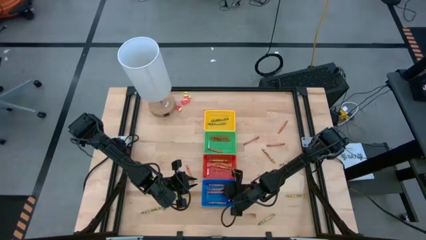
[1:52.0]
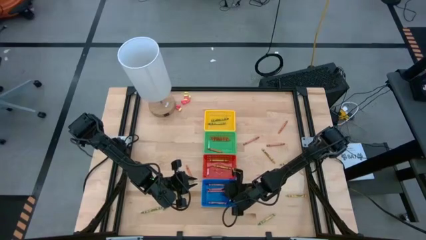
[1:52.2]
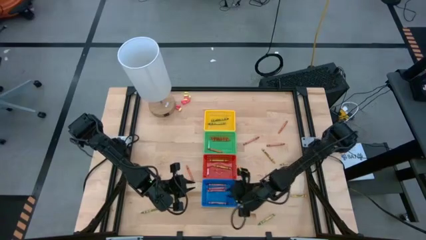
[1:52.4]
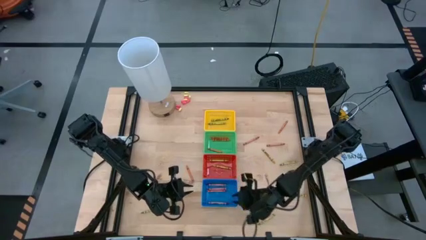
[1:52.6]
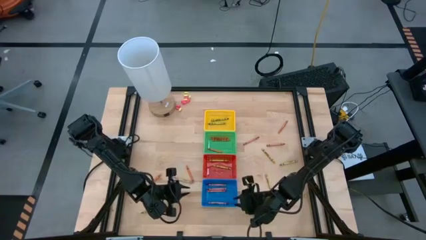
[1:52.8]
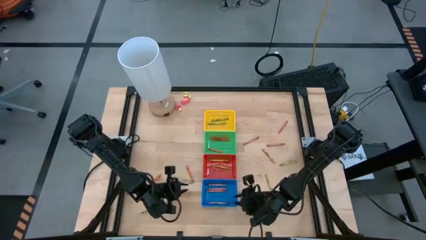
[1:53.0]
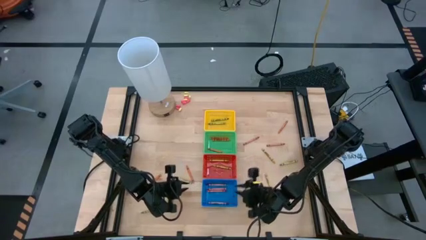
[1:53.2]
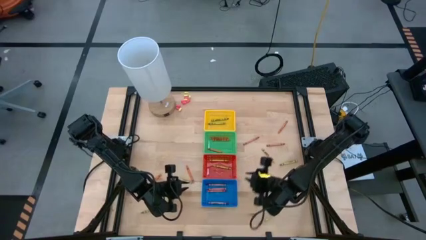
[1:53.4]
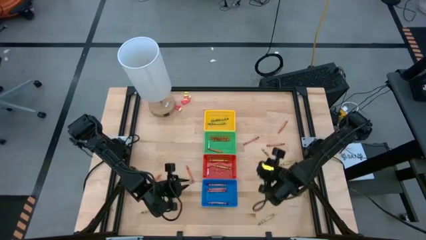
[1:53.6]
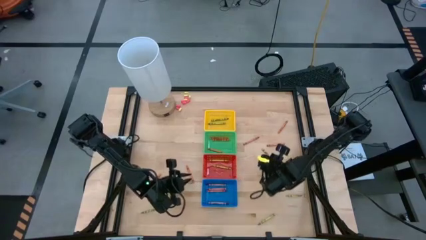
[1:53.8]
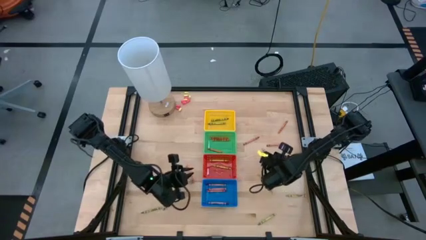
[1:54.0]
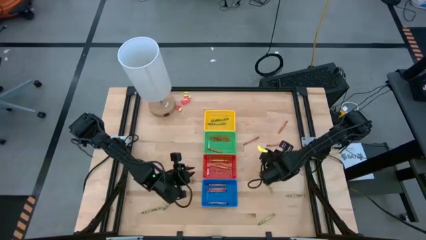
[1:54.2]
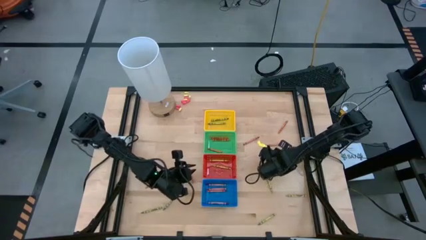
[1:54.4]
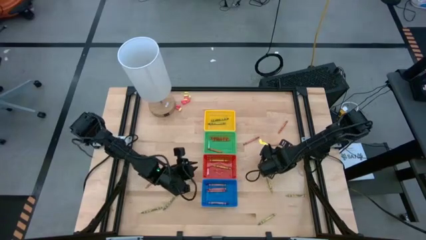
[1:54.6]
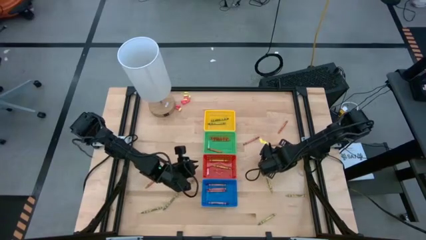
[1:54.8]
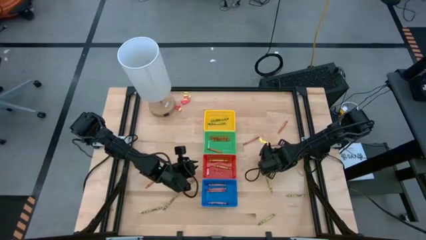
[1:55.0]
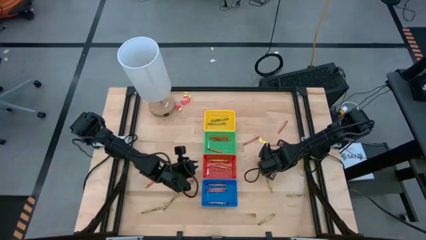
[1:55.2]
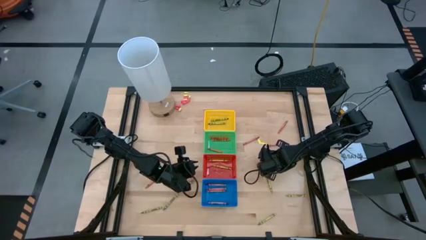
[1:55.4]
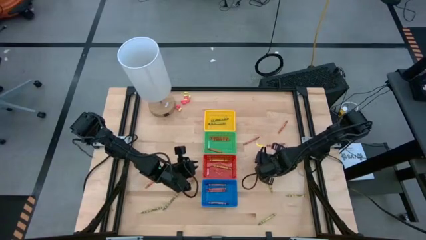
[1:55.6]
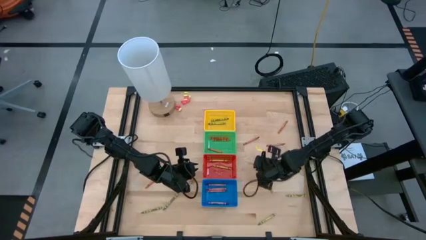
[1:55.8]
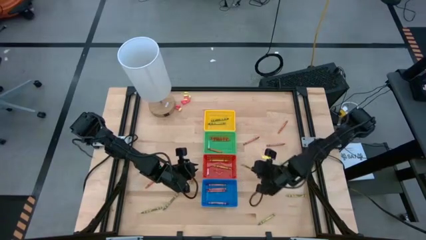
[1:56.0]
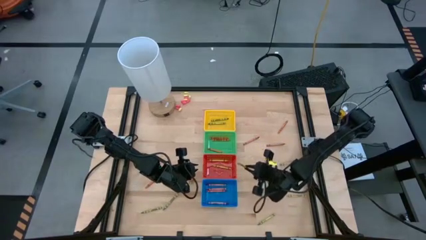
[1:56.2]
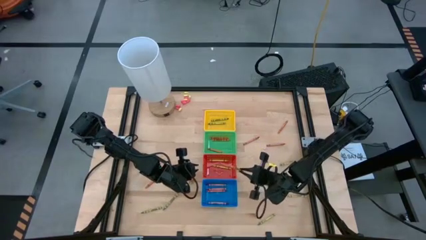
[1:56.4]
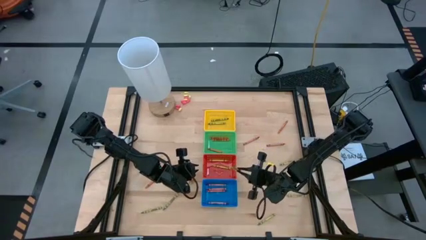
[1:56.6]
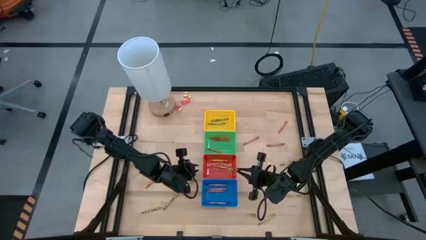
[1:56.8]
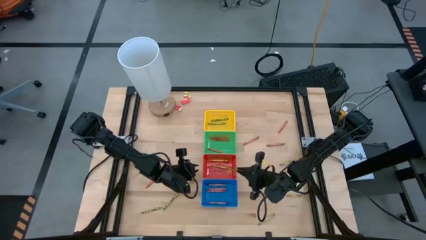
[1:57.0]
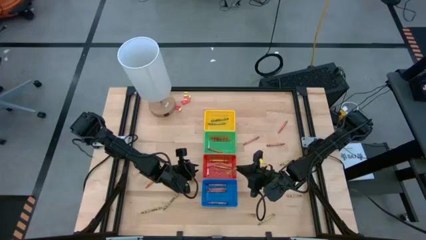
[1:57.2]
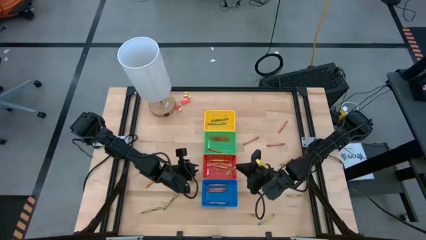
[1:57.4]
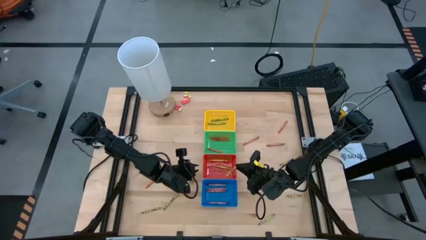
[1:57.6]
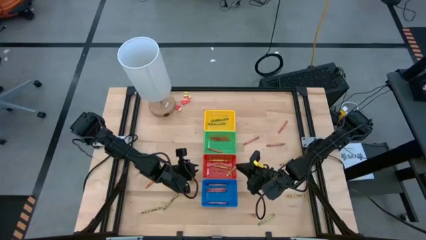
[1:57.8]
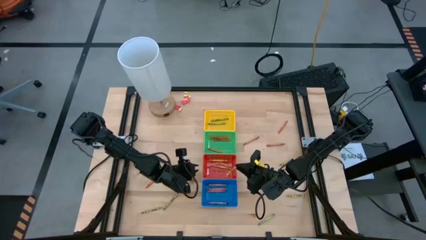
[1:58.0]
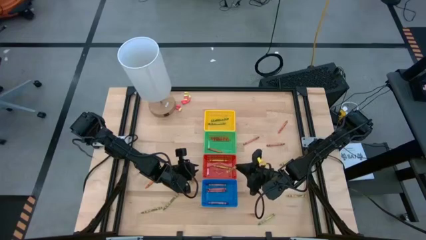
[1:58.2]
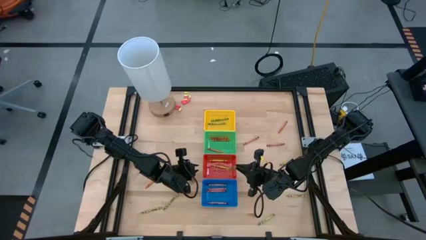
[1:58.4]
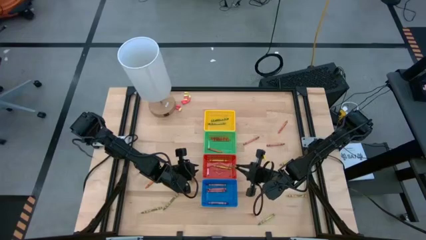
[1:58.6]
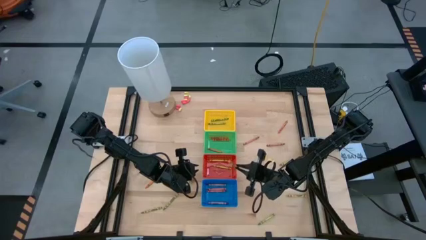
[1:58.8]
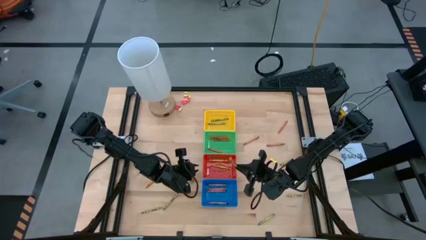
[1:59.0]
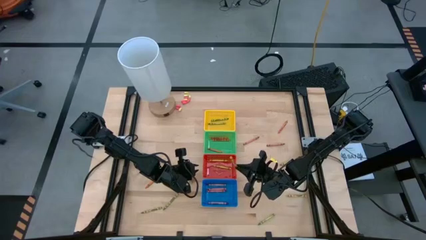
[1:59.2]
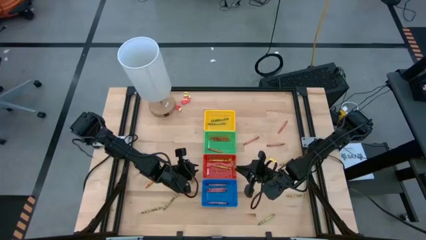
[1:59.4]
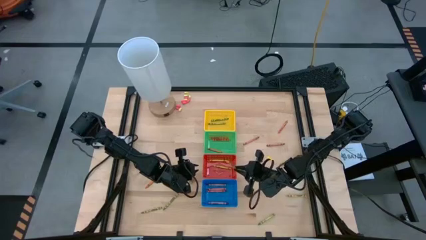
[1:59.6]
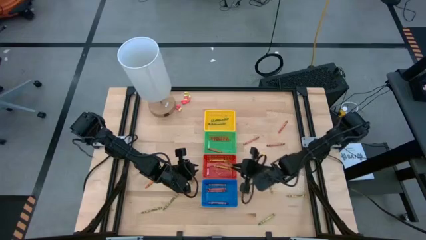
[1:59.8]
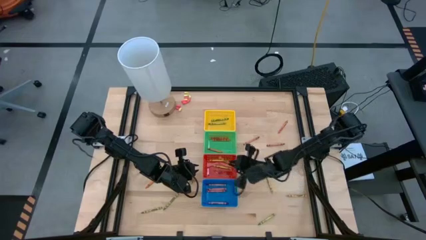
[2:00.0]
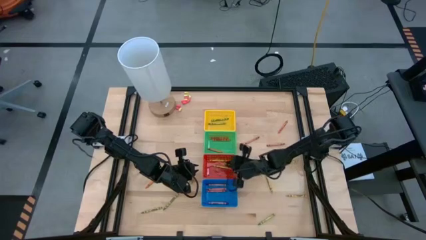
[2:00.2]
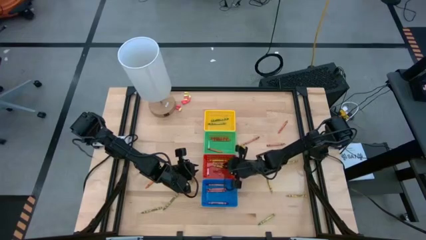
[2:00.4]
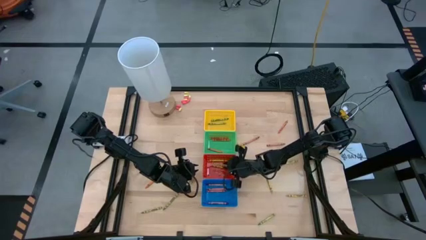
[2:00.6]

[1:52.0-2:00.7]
Task: Sort crayons
Put the yellow crayon into the red bin

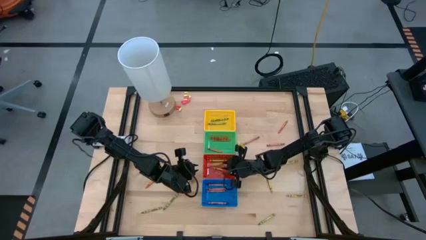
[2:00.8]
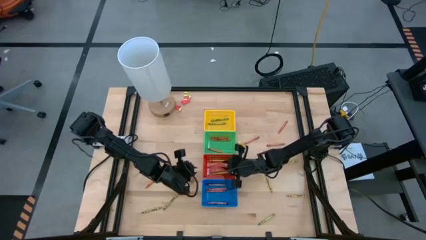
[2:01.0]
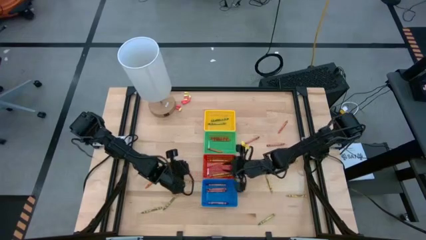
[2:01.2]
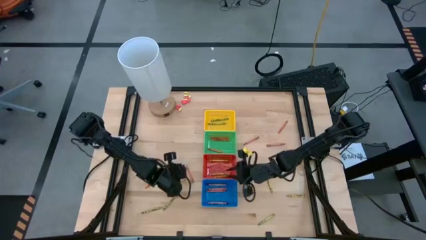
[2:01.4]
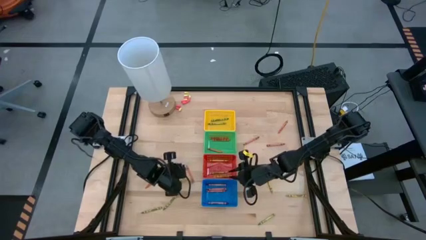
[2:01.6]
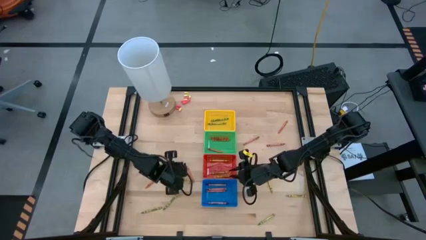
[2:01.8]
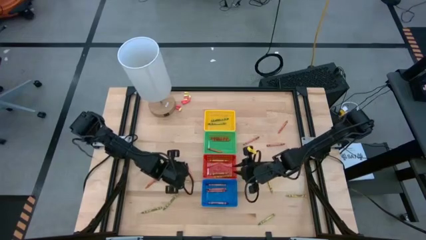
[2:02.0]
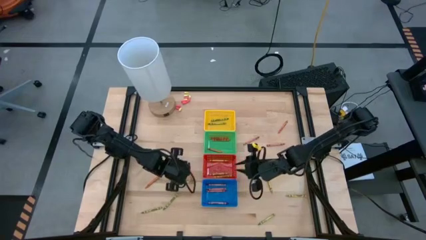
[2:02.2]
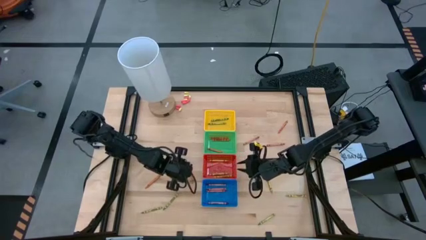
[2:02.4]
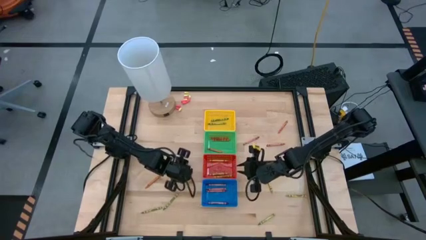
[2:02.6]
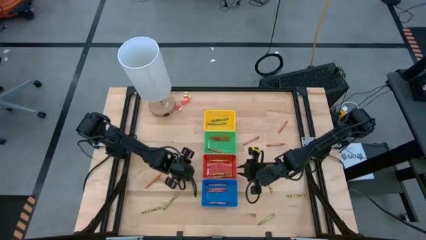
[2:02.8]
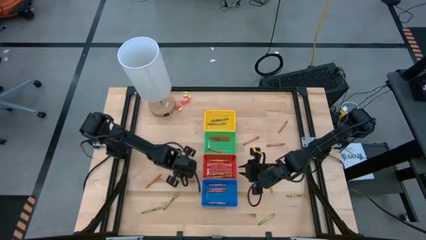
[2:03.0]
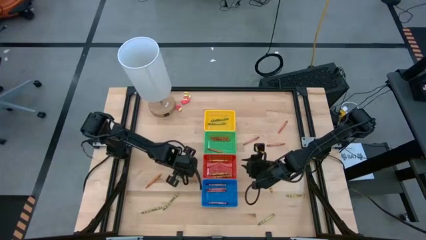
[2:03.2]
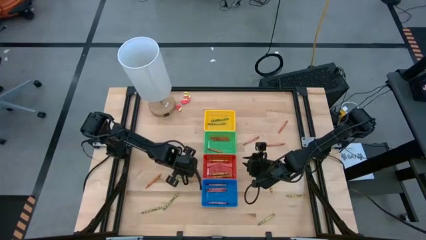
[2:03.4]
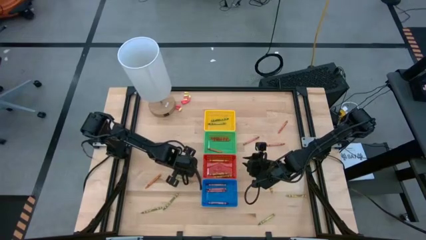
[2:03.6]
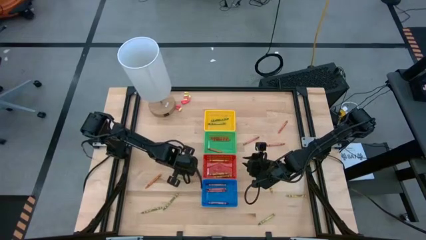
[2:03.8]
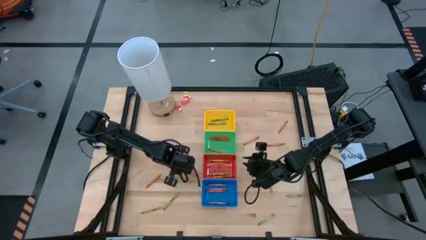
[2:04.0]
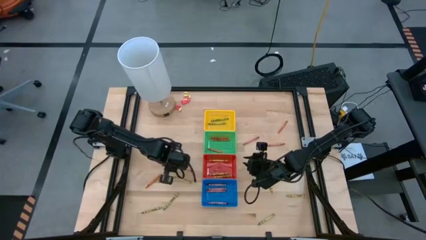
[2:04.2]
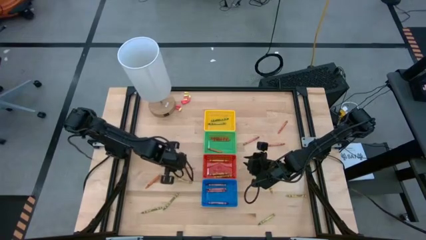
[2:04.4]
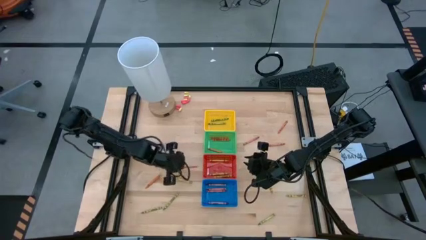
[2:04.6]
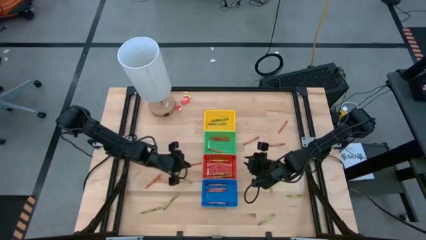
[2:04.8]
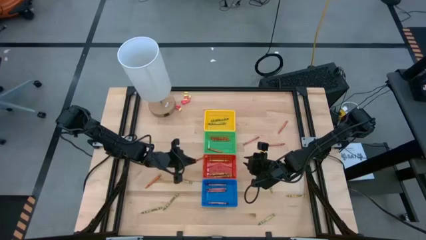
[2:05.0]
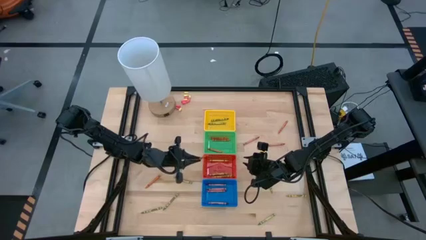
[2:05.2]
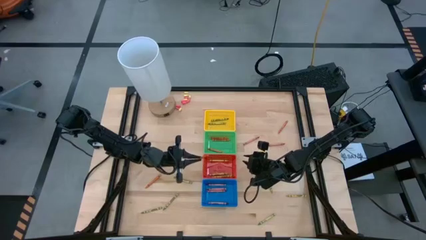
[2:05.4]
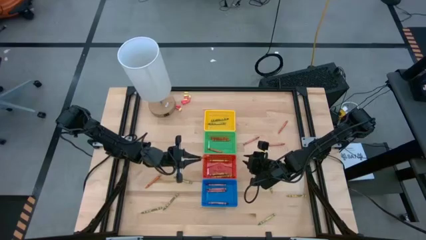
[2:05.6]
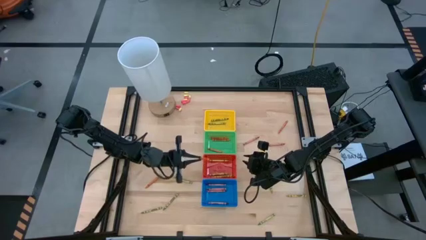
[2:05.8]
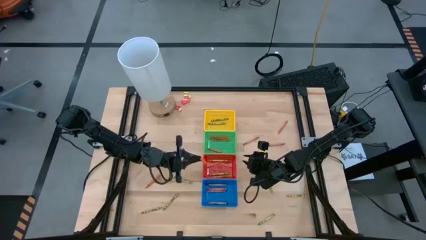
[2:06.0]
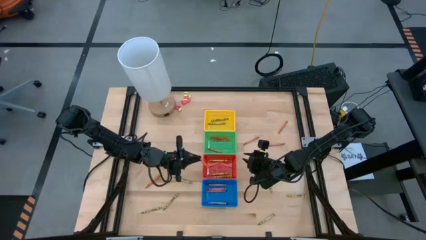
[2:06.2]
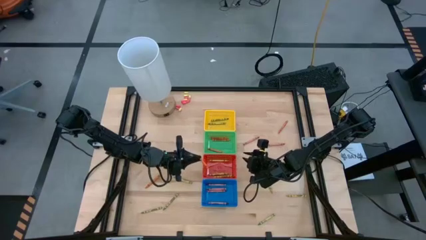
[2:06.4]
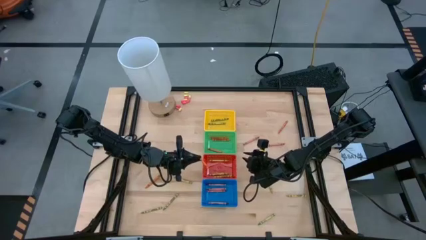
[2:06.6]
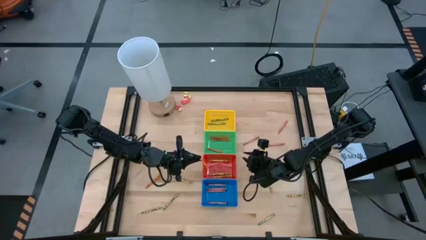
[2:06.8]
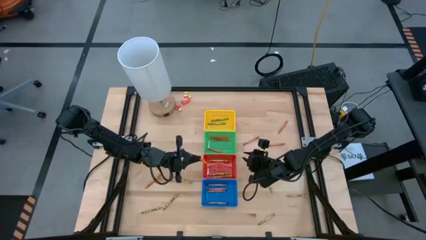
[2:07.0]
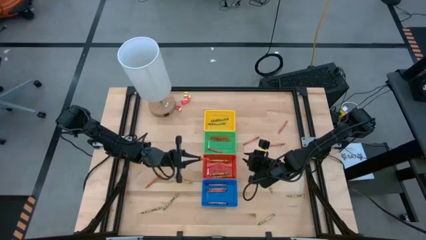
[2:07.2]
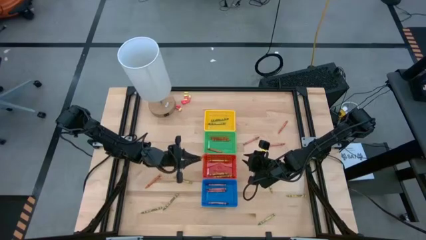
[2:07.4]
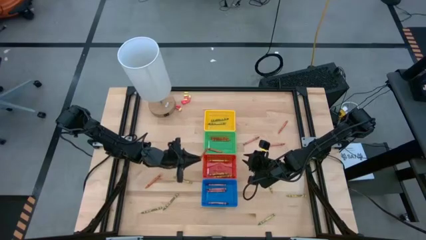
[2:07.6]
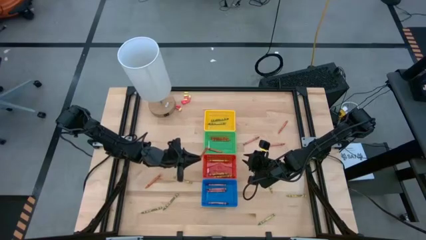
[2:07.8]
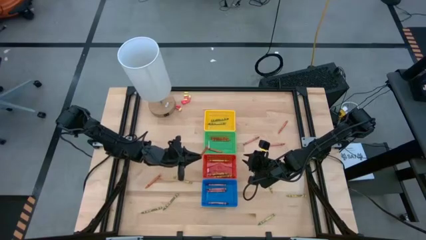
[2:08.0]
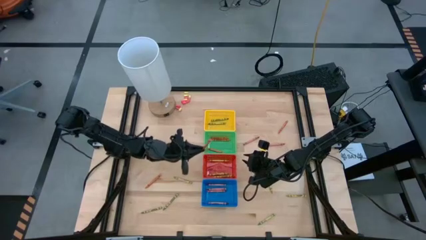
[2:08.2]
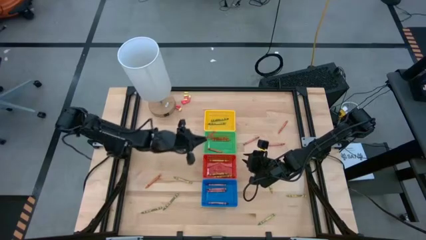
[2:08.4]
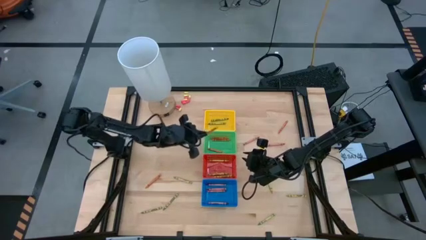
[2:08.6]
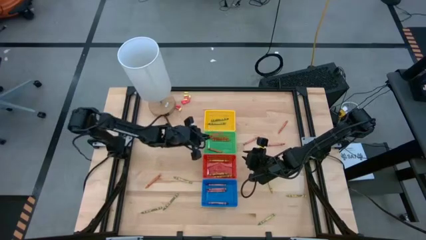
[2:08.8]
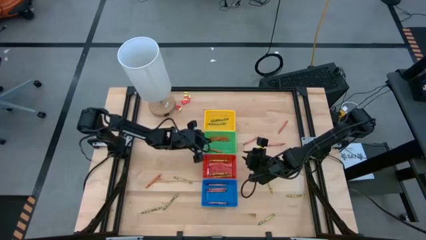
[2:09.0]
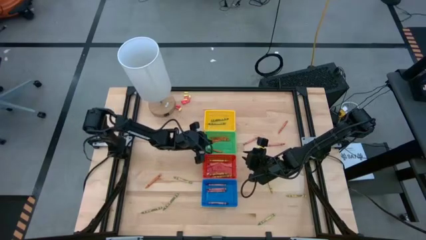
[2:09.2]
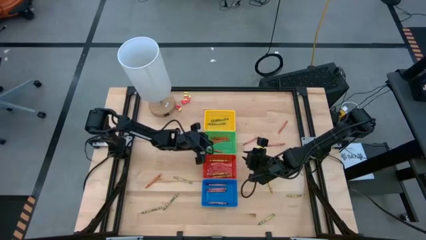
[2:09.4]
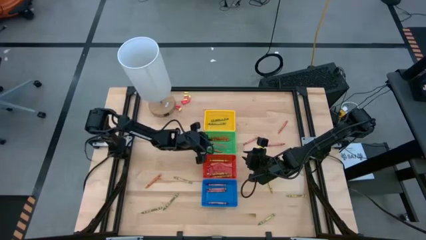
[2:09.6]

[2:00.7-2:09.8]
Put the orange crayon into the green bin
